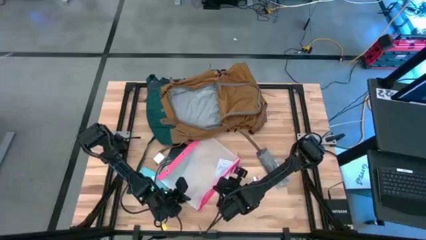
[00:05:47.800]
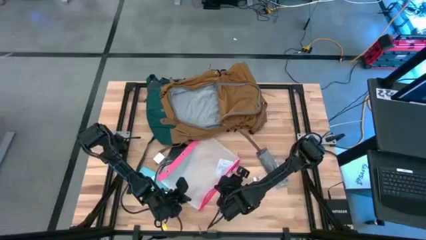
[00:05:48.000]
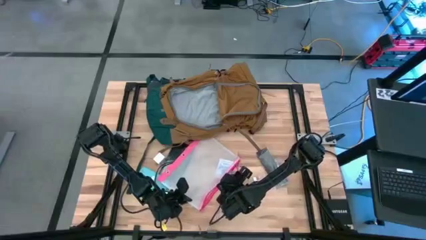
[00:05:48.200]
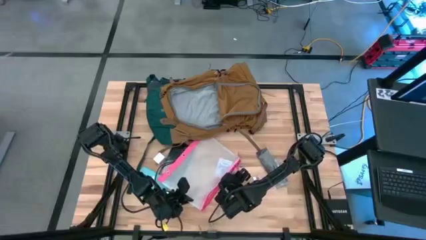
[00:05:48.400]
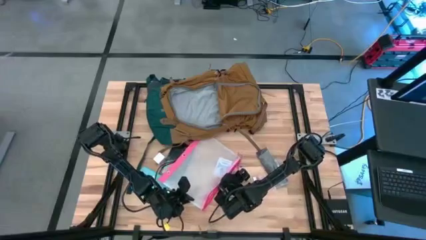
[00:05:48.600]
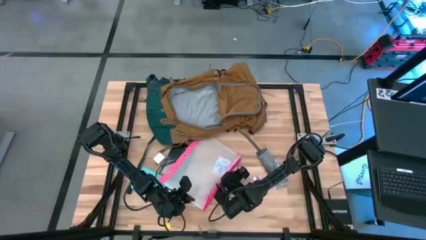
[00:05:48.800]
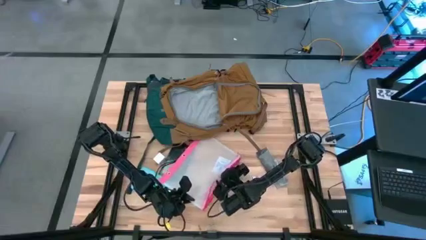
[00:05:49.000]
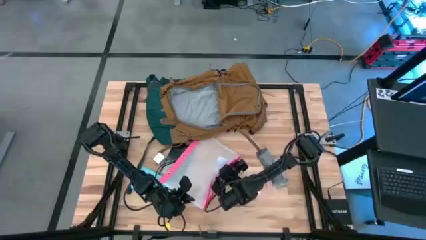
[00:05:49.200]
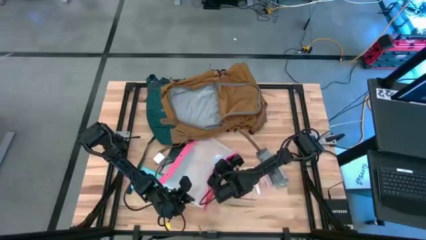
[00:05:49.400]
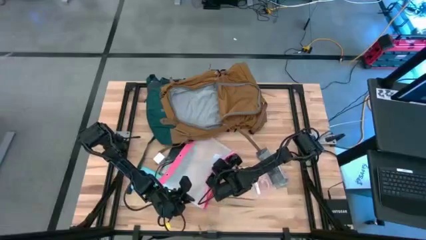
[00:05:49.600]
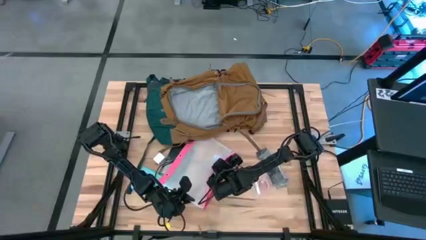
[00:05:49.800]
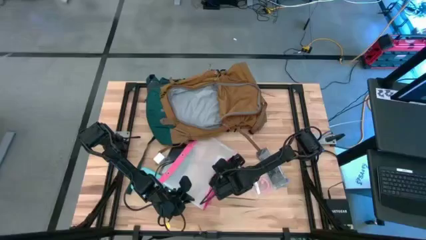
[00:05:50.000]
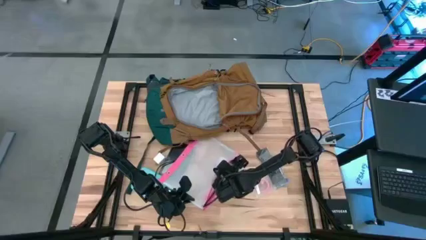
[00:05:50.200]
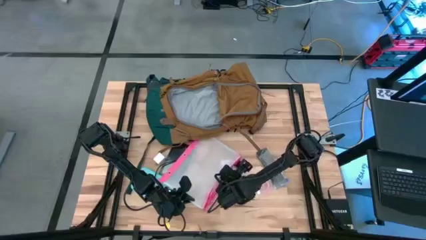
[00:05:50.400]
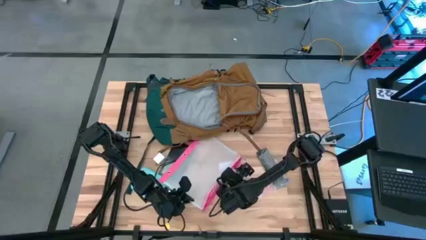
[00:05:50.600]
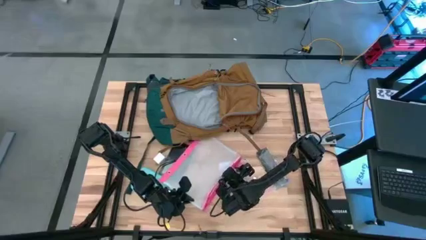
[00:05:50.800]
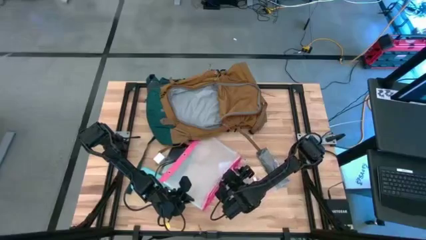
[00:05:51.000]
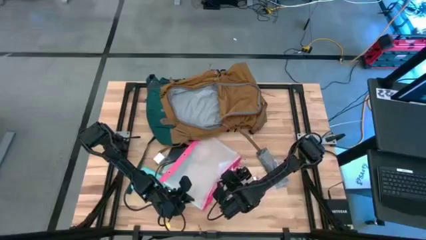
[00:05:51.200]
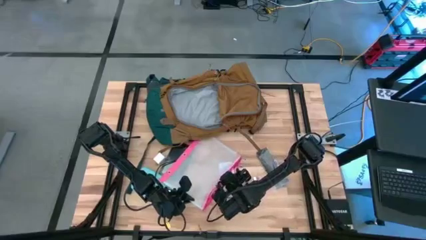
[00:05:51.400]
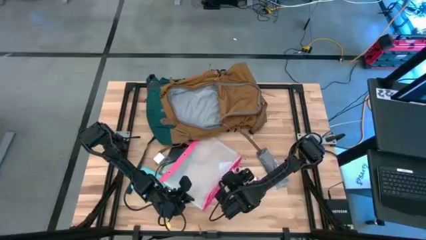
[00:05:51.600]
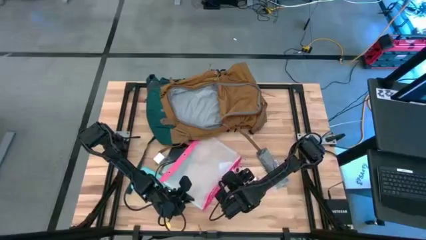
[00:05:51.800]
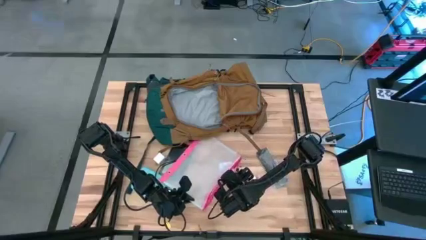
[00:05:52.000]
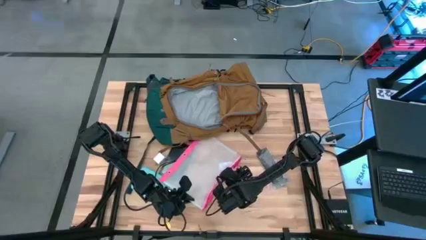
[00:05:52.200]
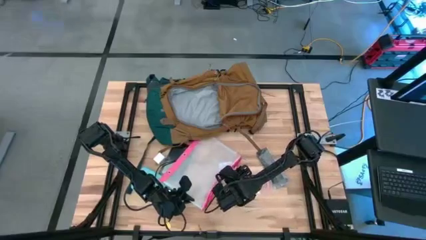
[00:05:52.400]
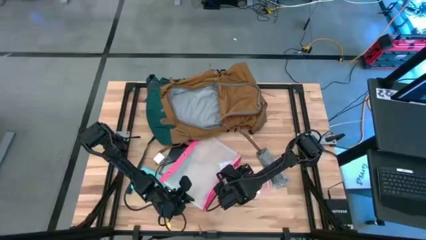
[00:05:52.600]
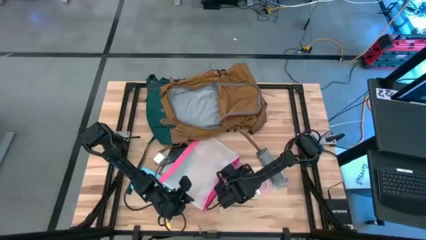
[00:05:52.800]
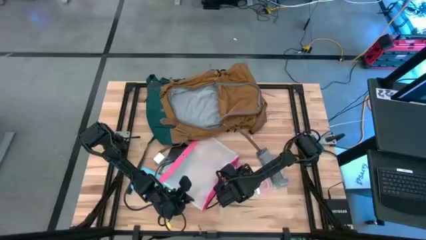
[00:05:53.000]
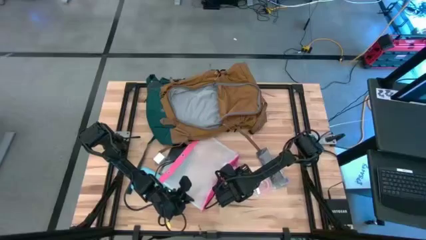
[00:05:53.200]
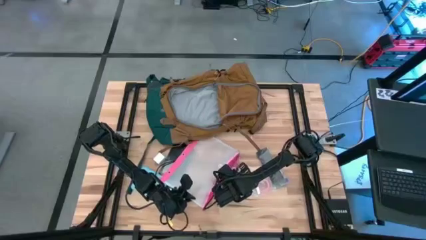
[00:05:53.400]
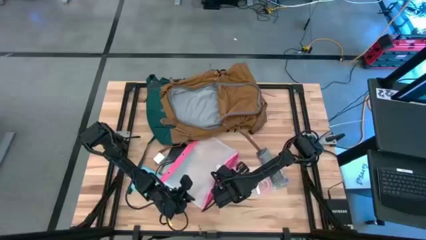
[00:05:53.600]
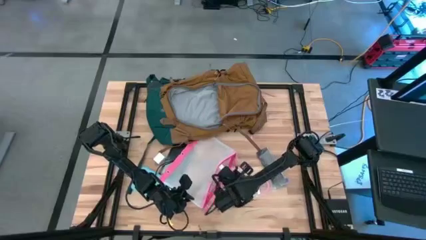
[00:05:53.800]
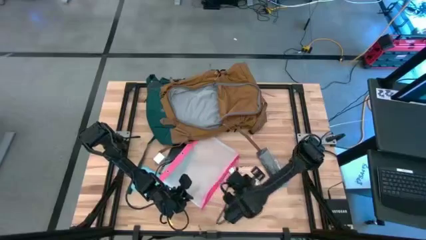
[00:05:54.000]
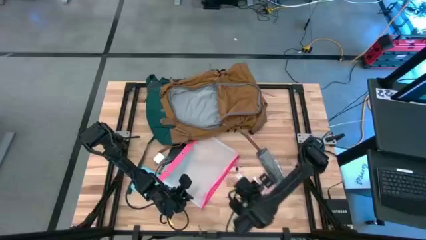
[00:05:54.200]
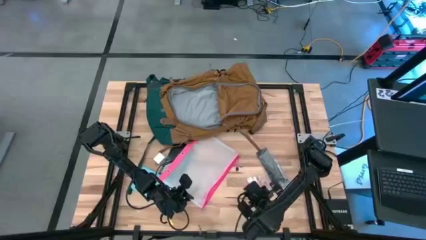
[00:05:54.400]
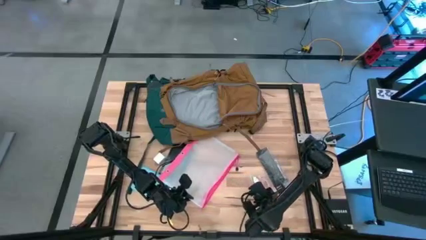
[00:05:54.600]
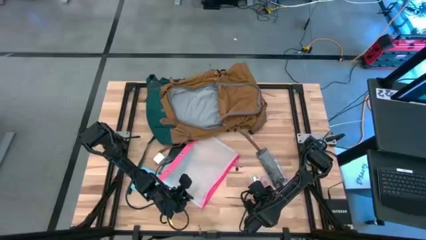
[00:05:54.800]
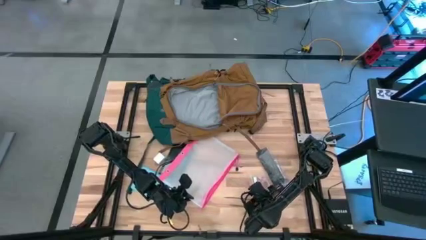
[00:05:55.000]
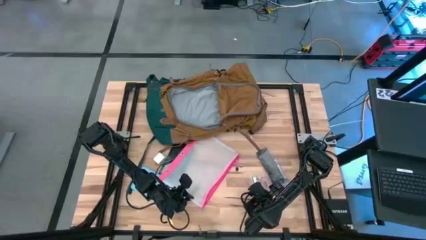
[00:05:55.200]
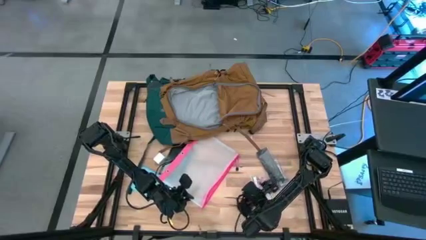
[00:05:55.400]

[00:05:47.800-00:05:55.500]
Task: Unpack backpack
Remove the blue playing cards from the pink zipper pouch

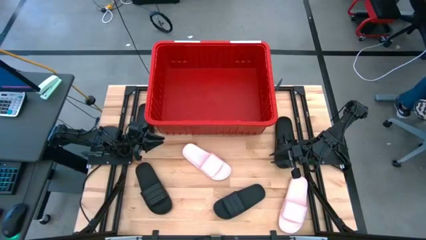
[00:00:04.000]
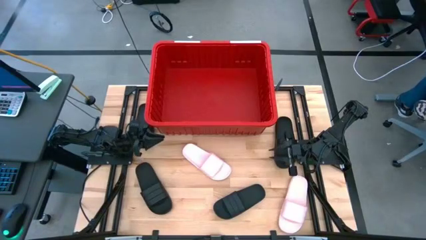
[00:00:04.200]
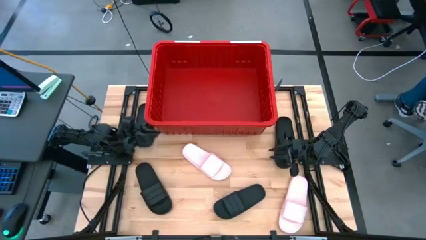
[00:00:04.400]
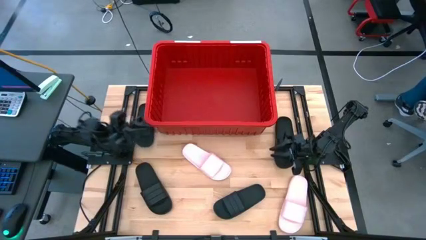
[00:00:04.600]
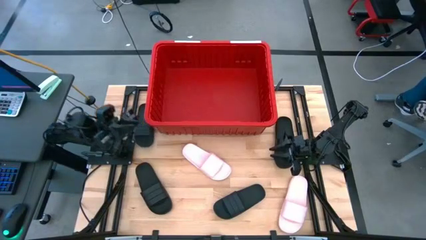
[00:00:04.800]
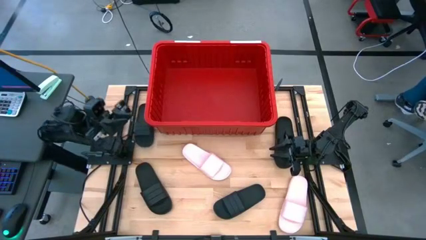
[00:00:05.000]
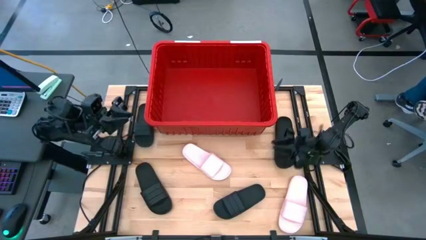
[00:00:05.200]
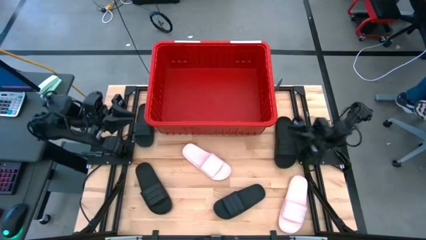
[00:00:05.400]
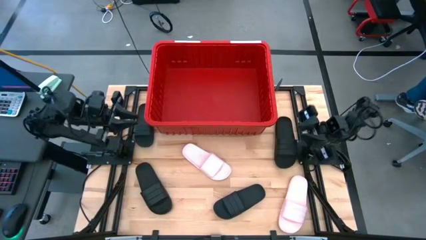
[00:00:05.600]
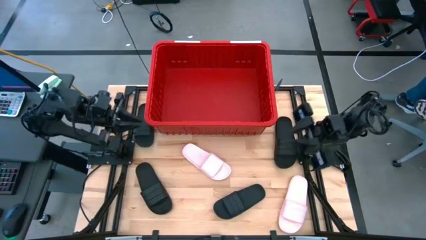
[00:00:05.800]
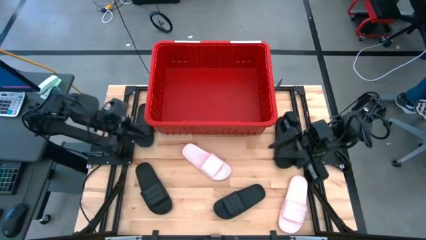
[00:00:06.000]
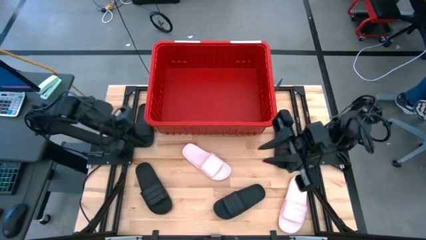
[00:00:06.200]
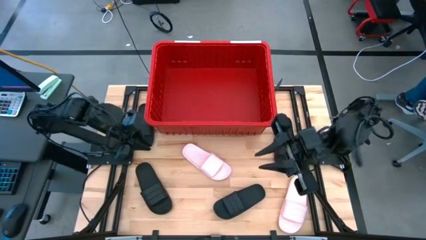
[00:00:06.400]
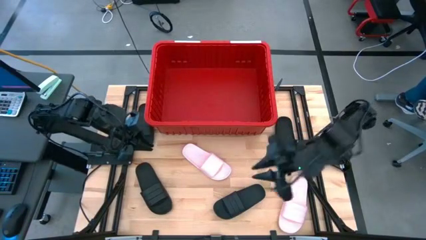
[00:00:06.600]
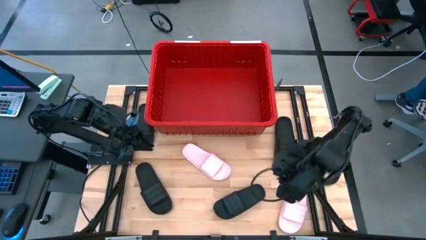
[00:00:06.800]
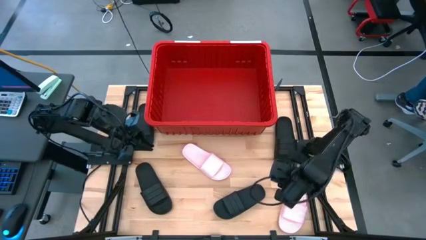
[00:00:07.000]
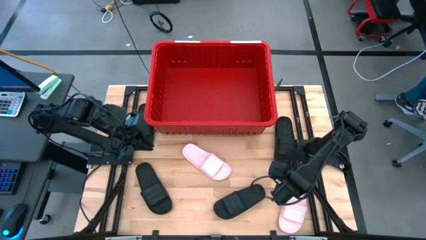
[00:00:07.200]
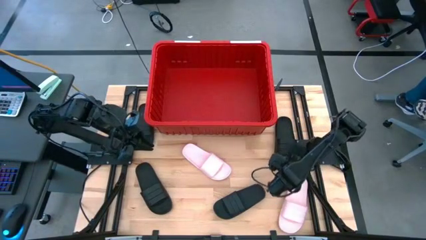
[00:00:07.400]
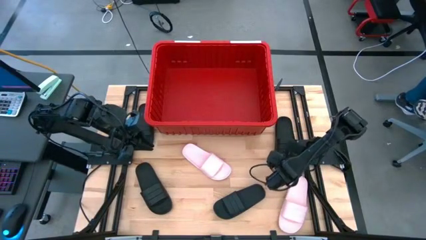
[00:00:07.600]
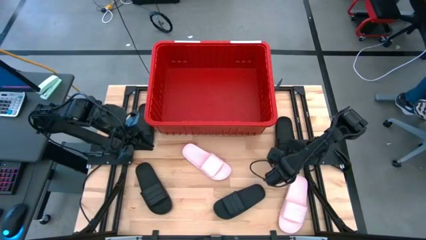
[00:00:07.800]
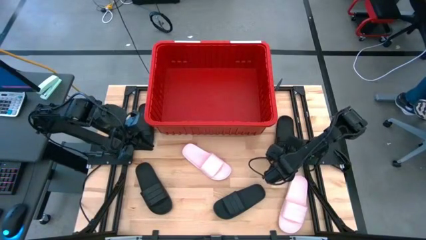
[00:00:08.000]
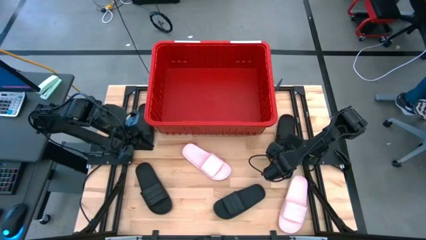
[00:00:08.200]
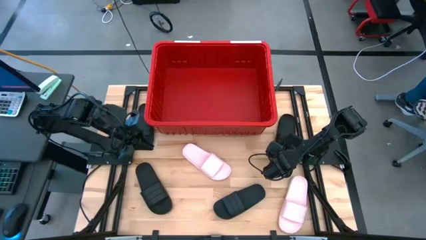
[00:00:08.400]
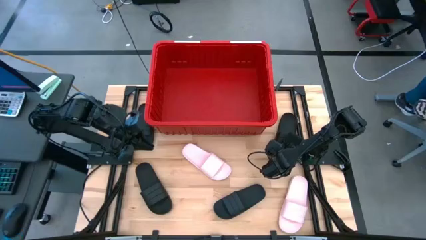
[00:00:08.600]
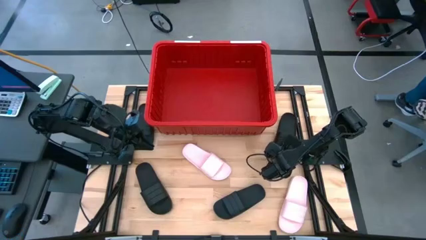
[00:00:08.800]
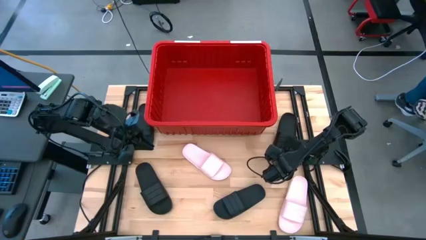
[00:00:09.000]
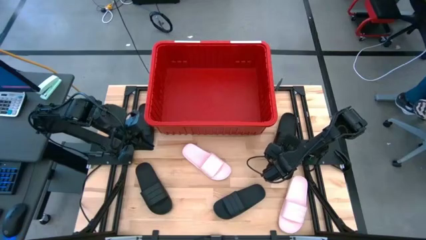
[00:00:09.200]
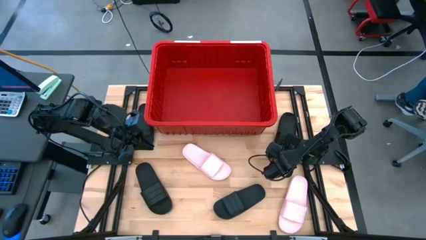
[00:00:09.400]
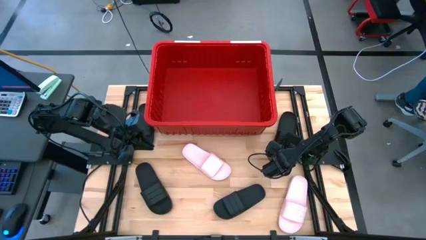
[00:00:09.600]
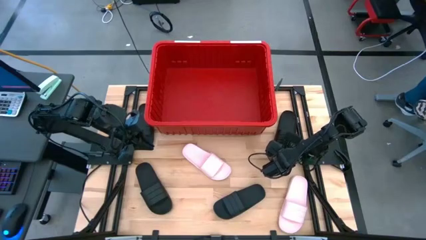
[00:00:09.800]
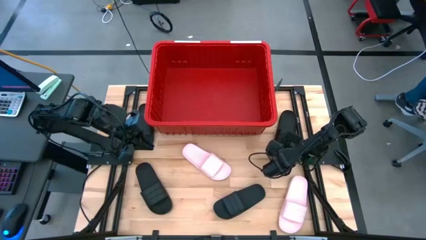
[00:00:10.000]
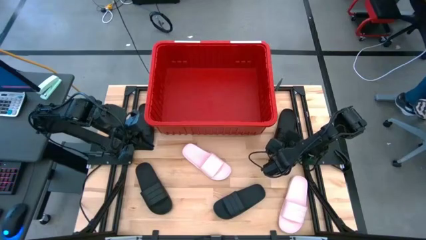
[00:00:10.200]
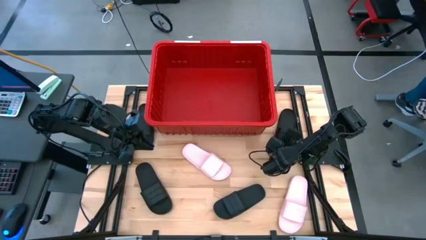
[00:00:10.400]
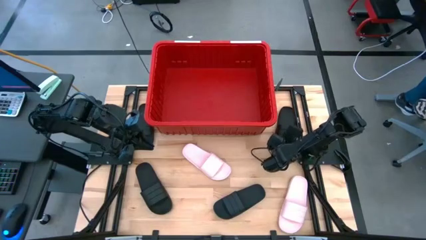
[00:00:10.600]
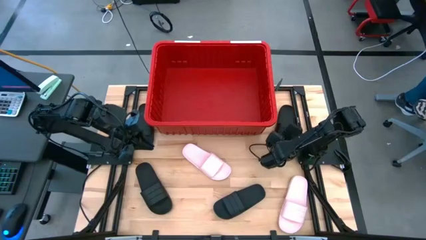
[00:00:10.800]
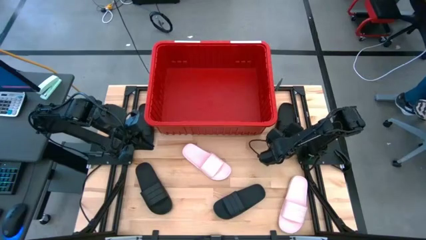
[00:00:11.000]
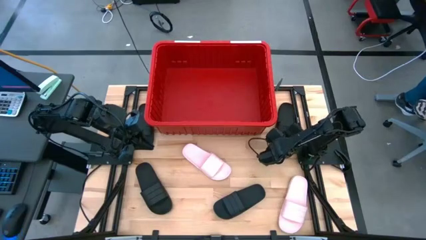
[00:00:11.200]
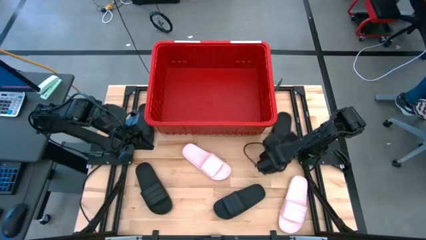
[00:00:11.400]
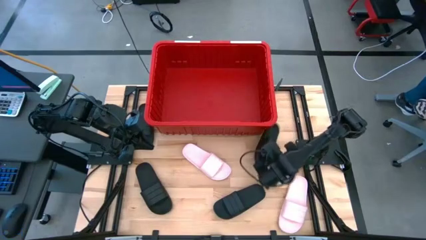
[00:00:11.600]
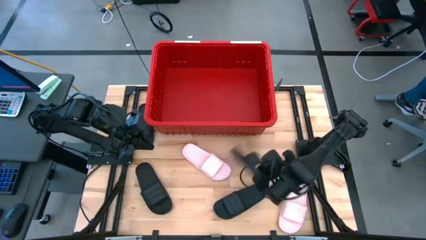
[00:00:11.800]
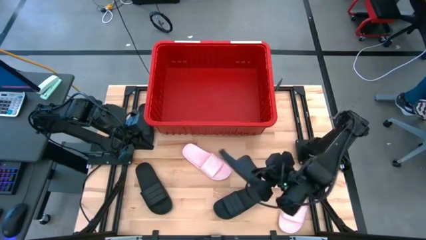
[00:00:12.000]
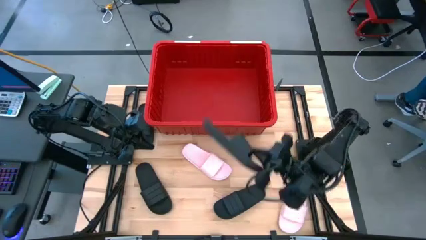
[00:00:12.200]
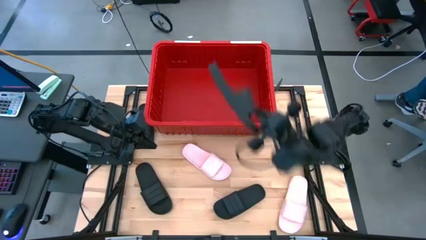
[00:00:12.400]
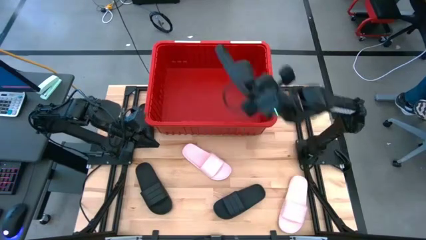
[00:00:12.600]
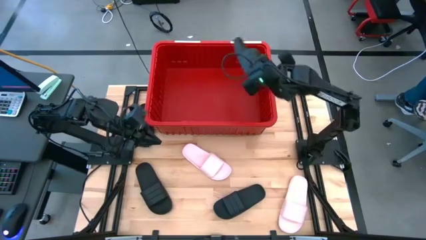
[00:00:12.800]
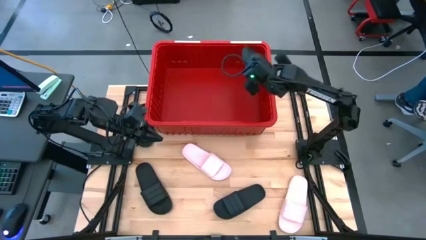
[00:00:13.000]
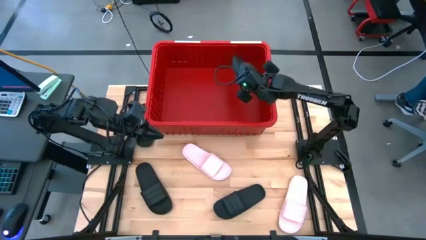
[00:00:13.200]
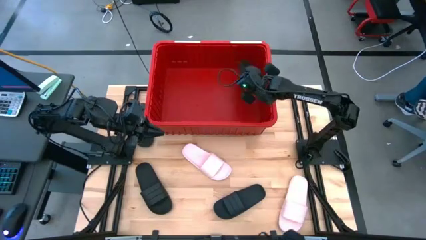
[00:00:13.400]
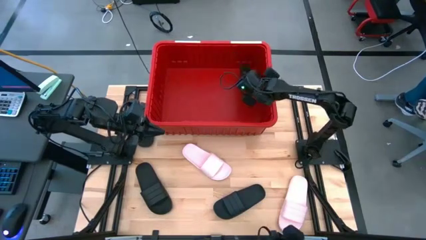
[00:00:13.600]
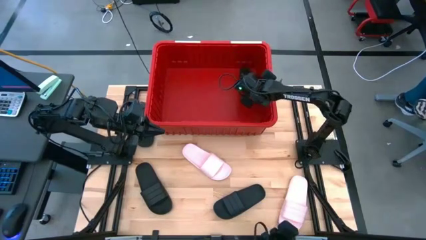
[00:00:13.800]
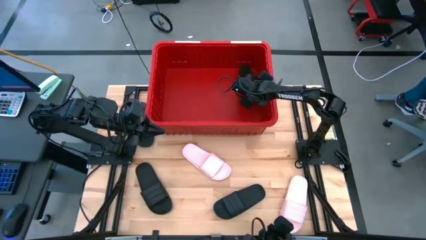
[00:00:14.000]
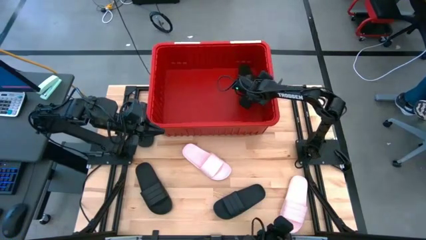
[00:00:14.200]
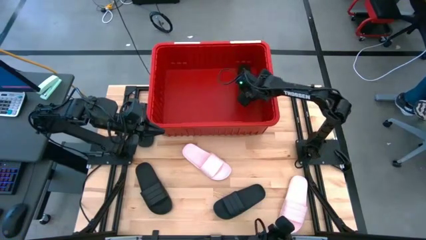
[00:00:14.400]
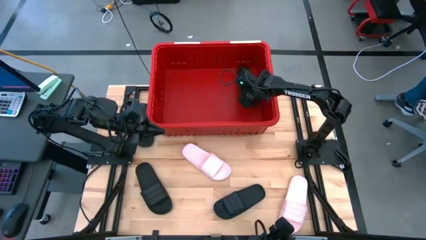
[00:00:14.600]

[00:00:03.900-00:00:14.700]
Task: Pick and place slides into bin
Put the black slide into the red bin
